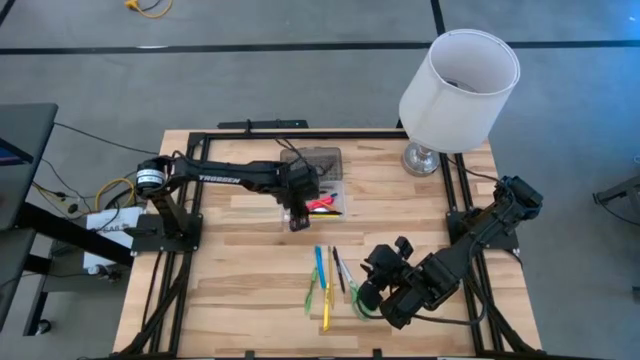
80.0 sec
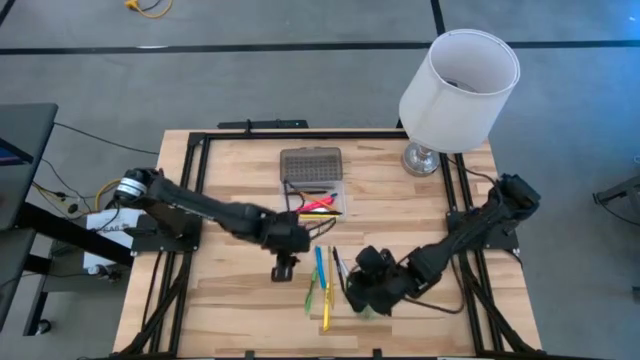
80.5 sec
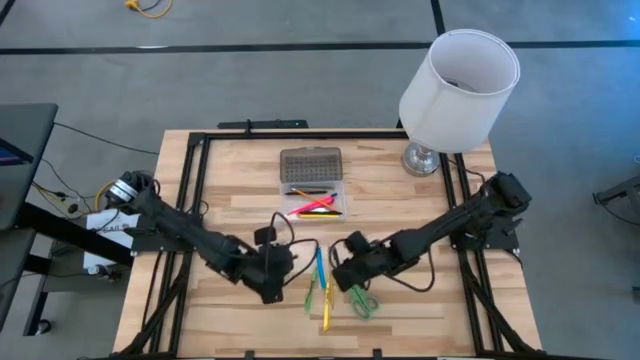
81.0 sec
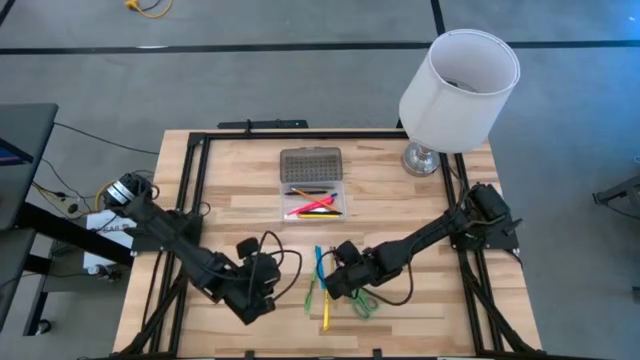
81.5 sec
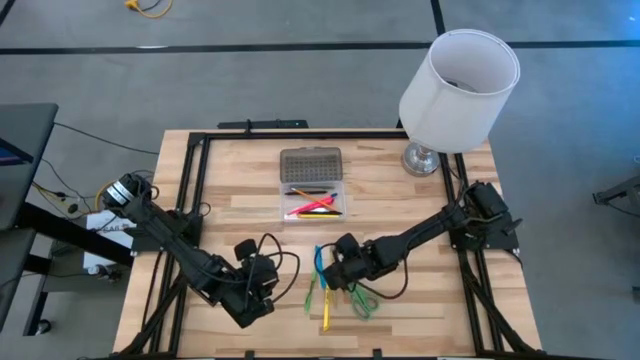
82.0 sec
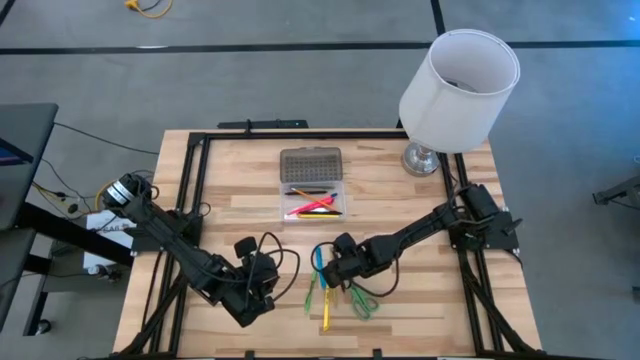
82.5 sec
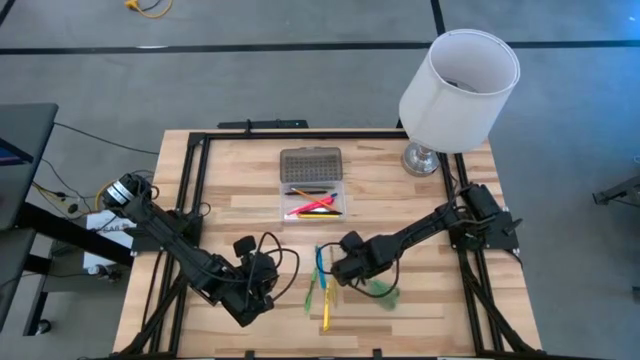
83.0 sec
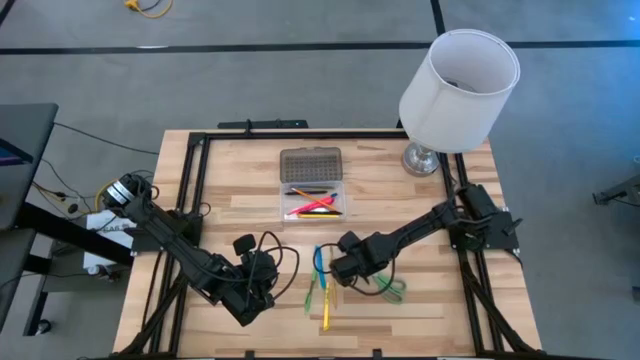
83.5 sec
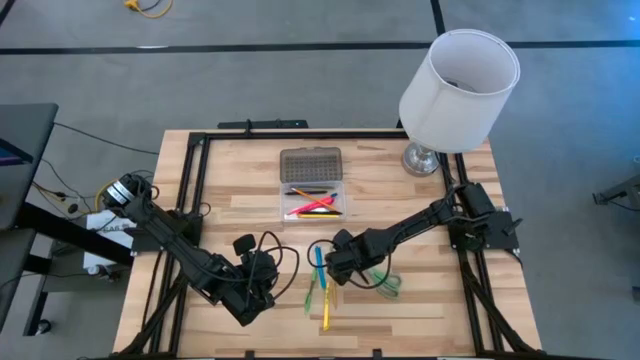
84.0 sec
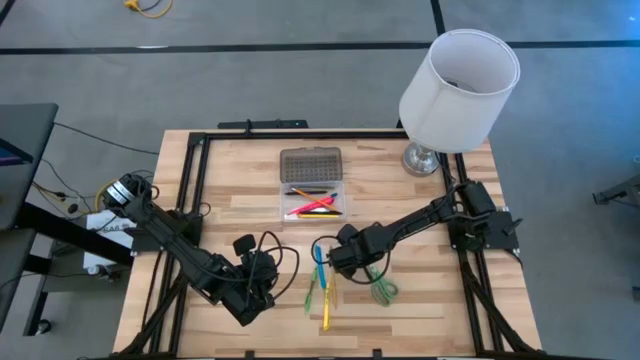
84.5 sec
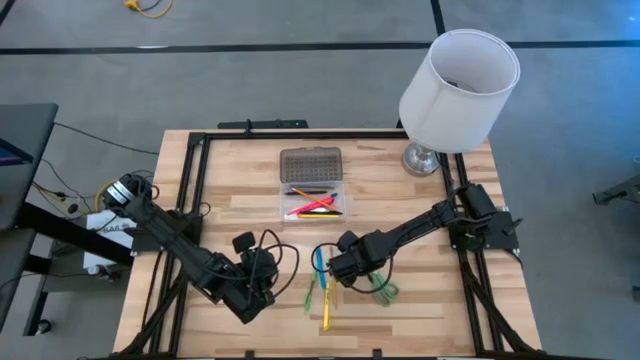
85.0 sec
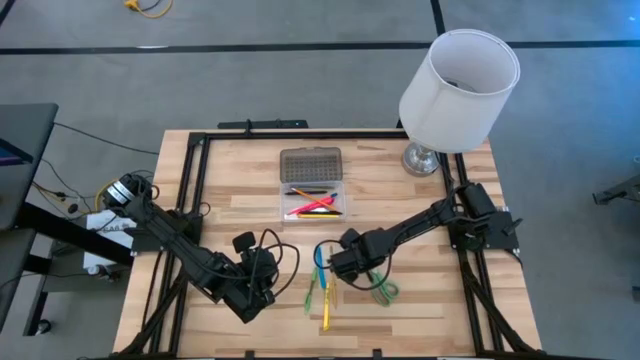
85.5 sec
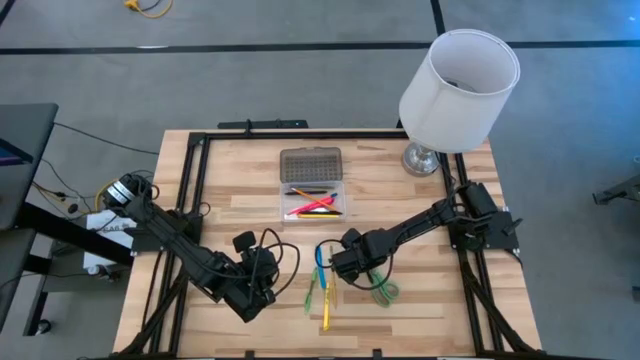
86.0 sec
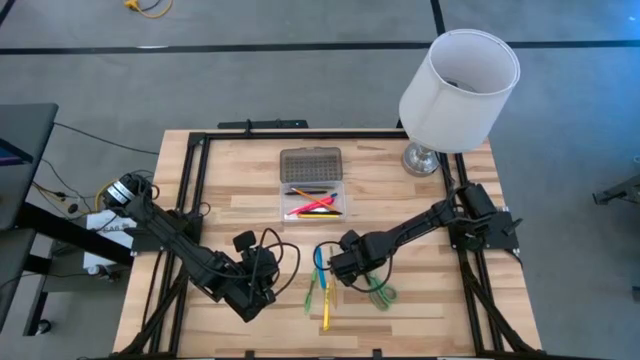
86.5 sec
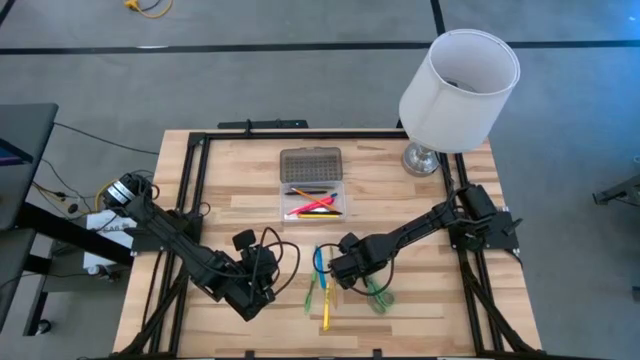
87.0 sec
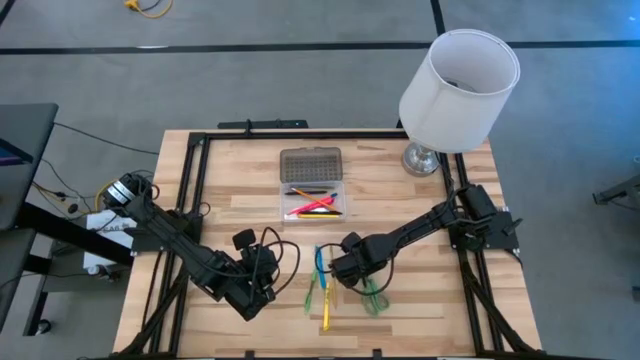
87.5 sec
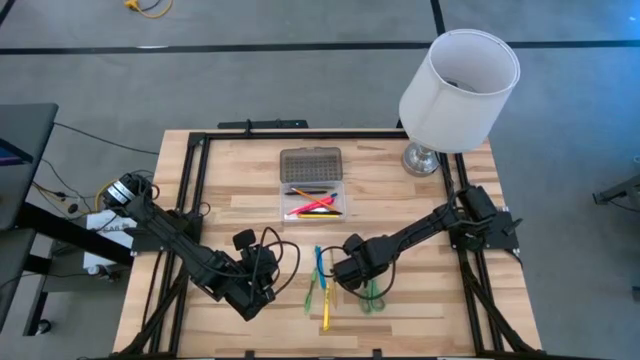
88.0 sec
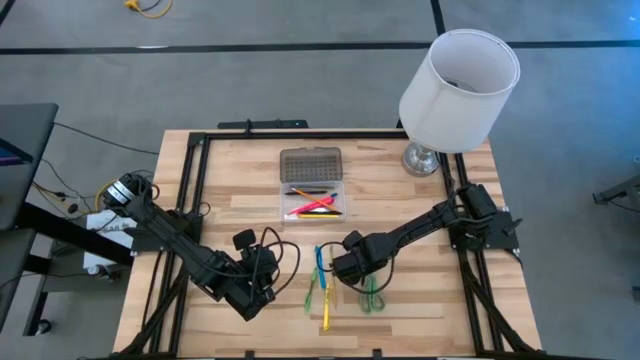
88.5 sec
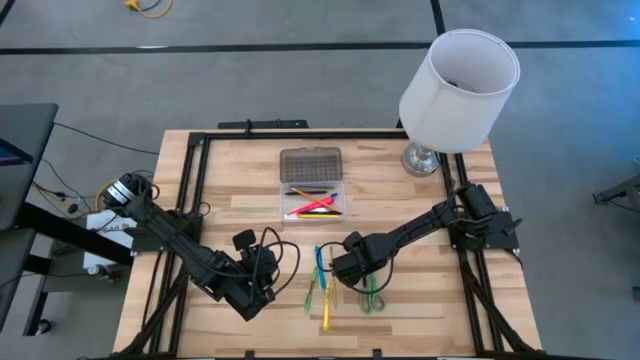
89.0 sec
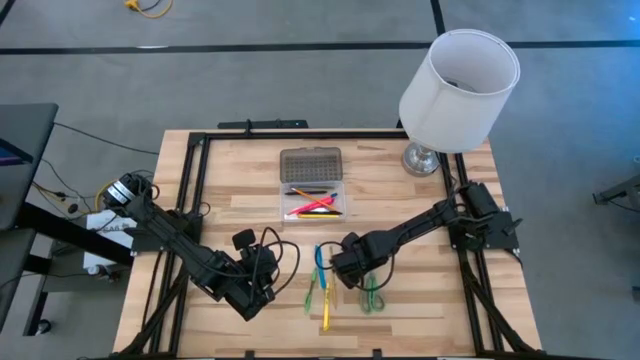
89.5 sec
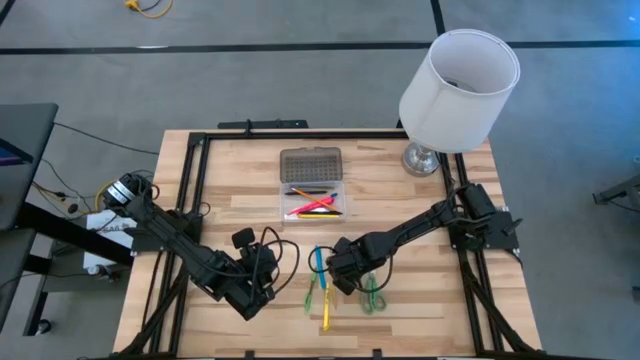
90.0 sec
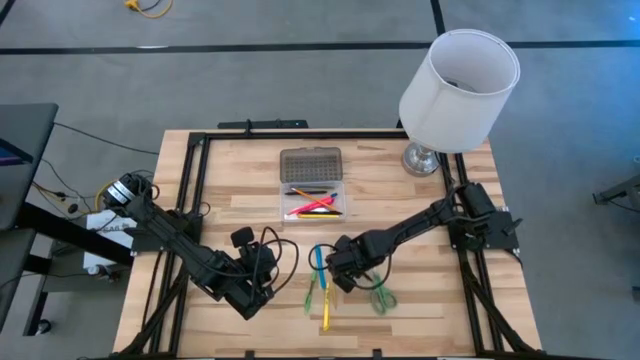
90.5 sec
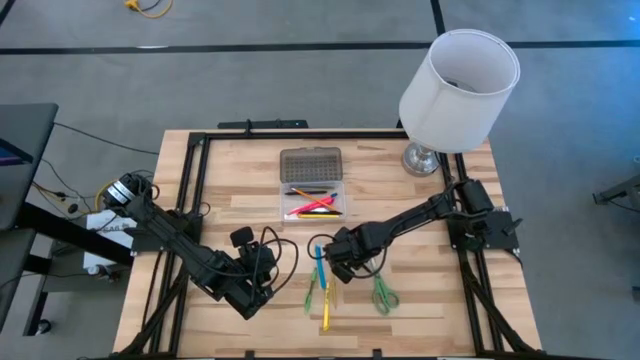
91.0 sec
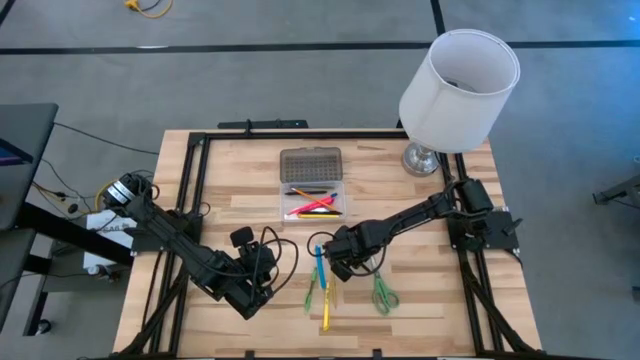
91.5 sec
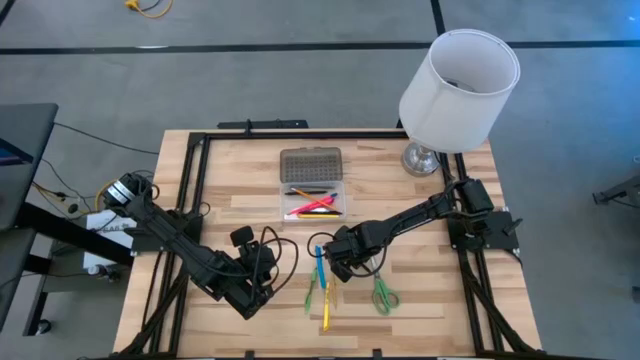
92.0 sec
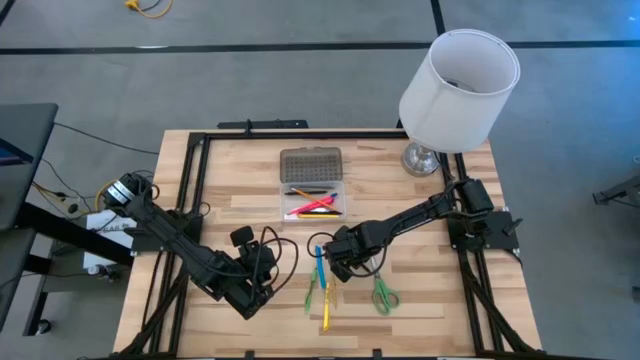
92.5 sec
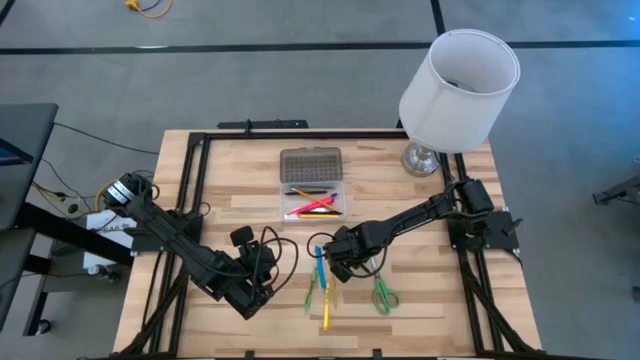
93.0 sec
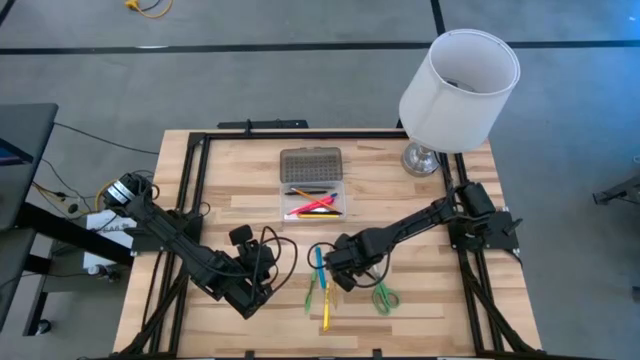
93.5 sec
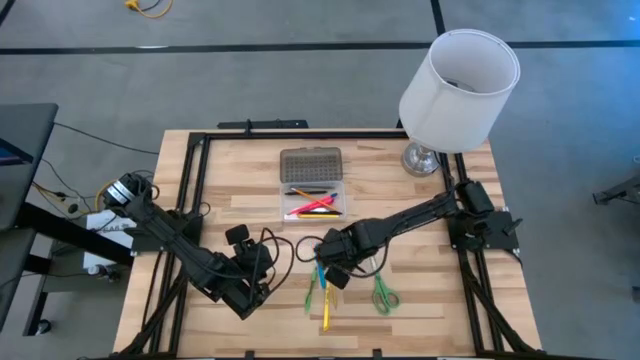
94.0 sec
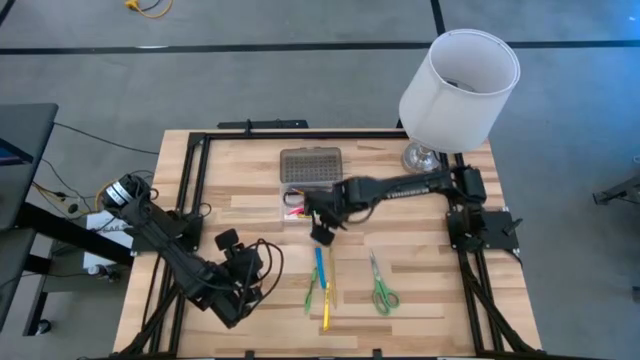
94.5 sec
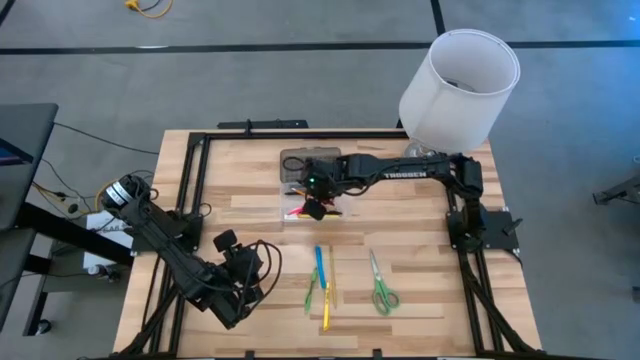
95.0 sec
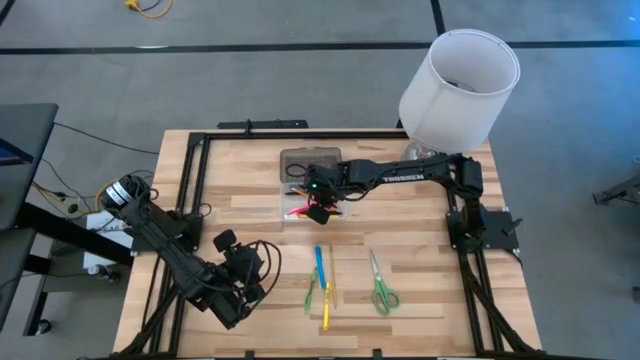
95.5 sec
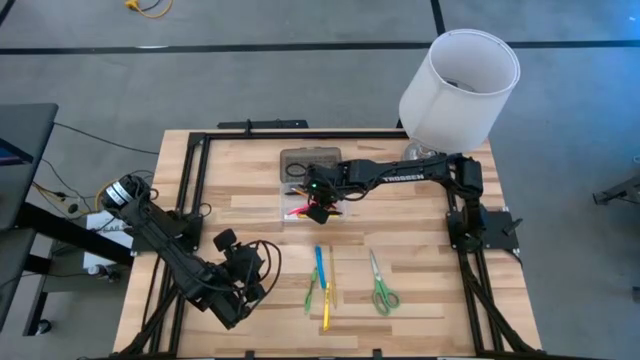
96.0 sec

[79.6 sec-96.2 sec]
Task: Pick & place school supplies into a supply box
Put the black pen into the supply box

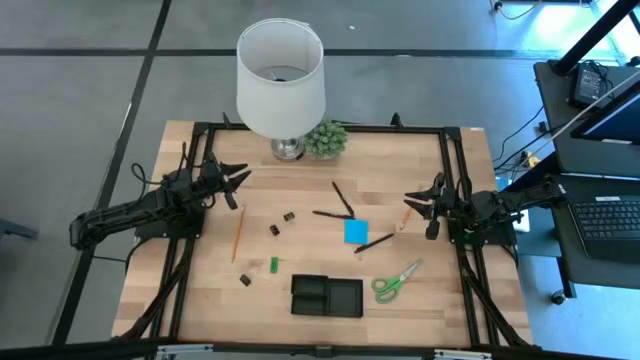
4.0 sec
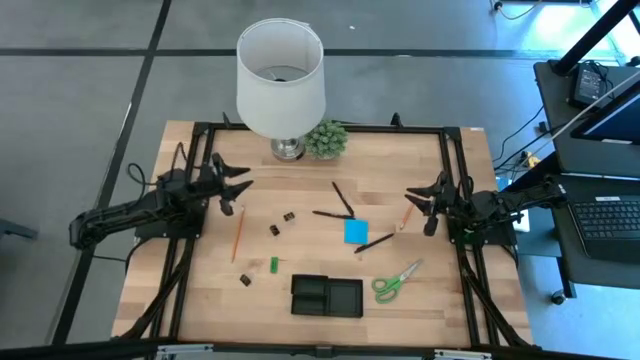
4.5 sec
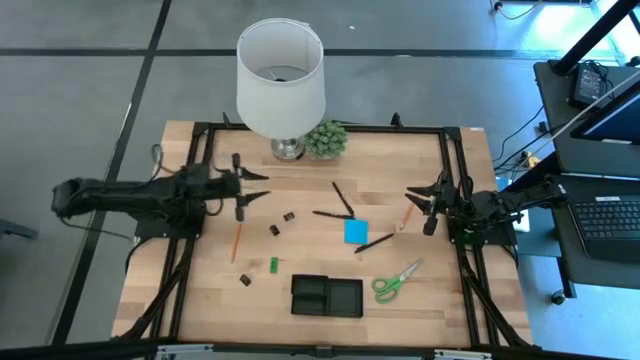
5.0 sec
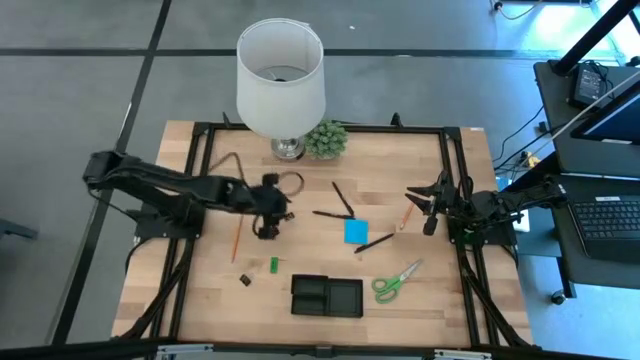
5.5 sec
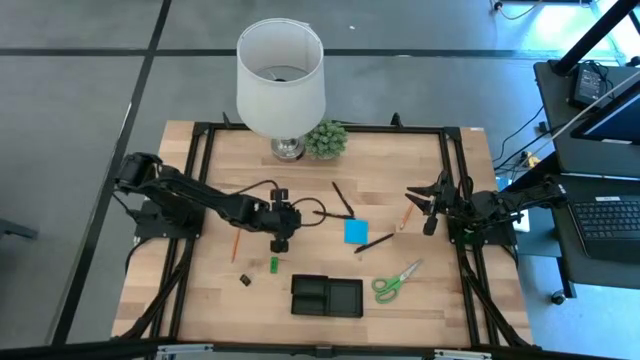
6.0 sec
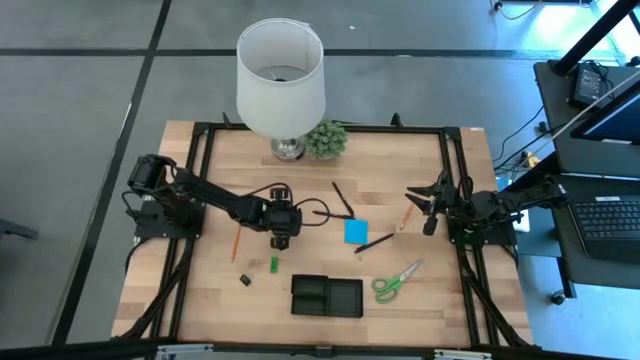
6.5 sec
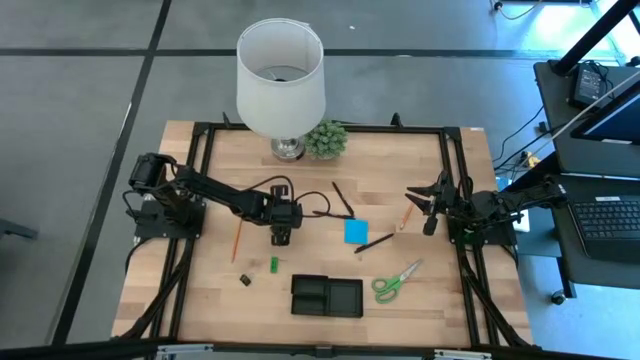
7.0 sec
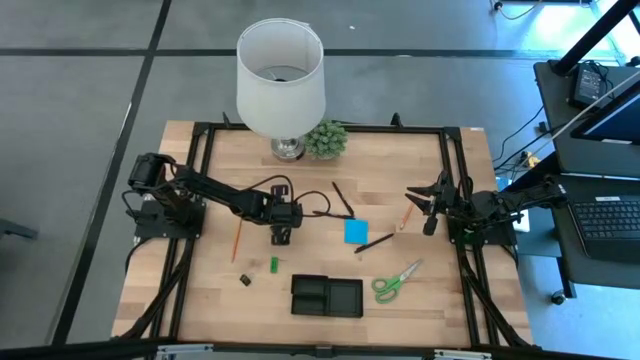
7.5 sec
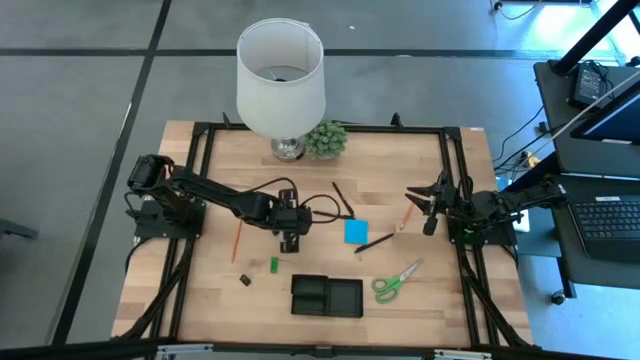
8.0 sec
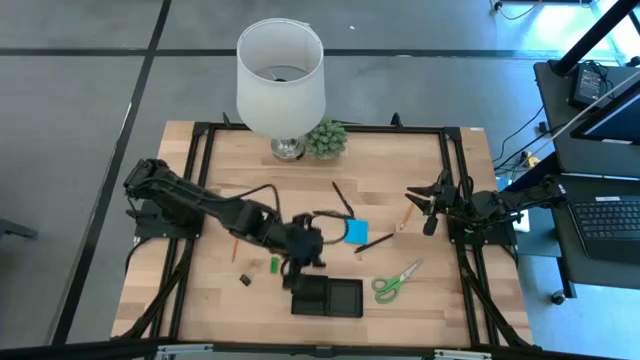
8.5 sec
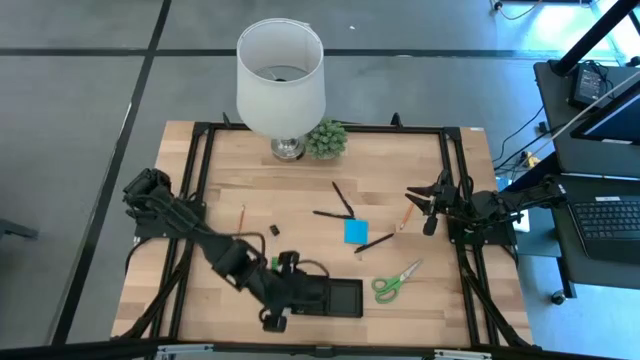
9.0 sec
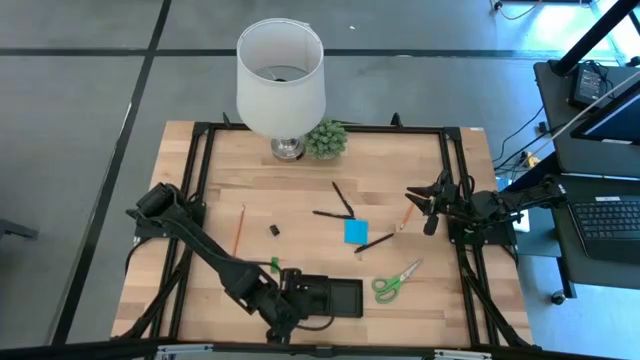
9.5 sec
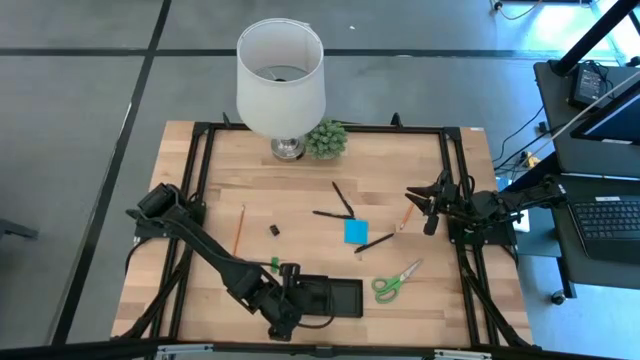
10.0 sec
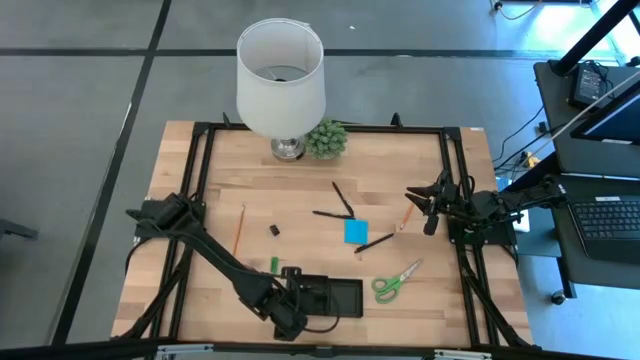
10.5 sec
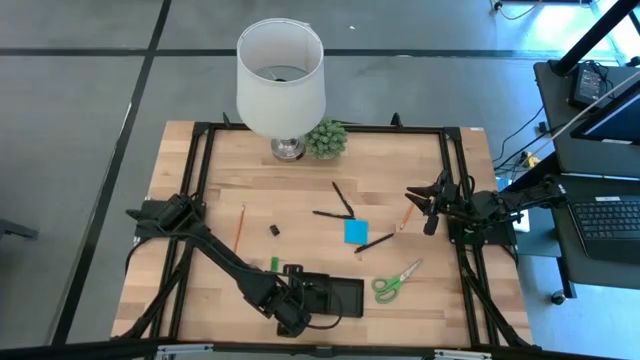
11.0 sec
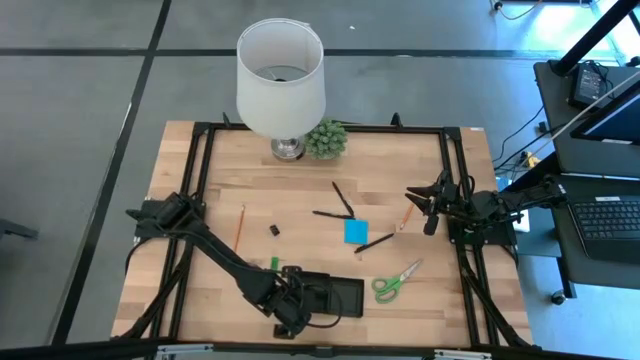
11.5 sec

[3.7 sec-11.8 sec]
Task: Pick and place office supplies into organizer
Put the top black binder clip into the desk organizer
